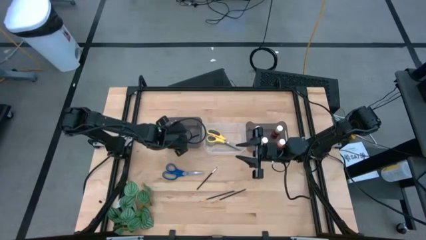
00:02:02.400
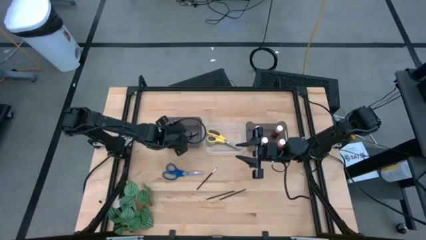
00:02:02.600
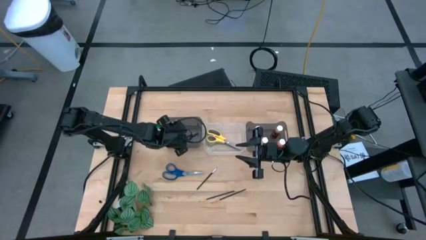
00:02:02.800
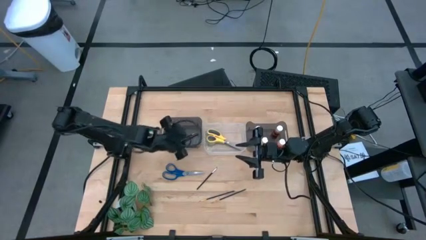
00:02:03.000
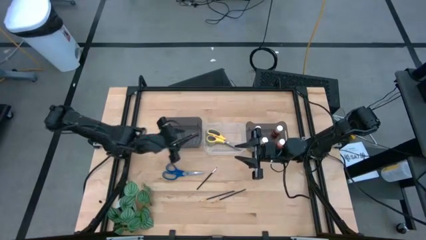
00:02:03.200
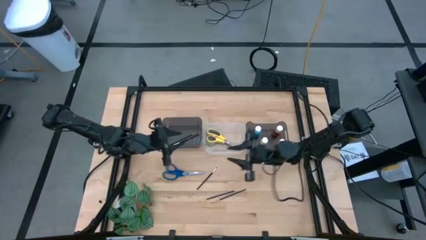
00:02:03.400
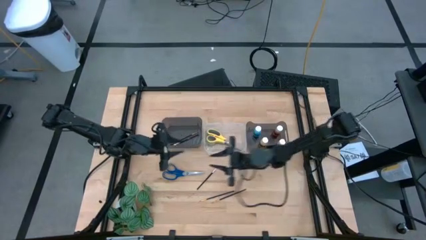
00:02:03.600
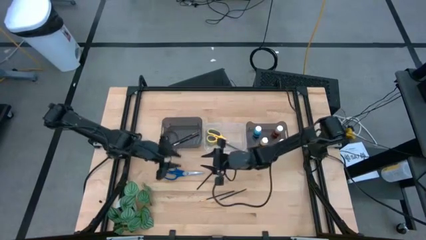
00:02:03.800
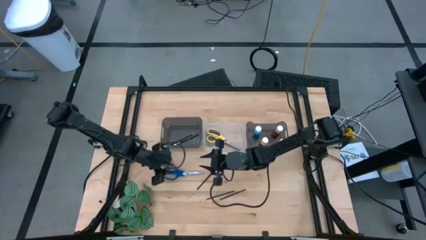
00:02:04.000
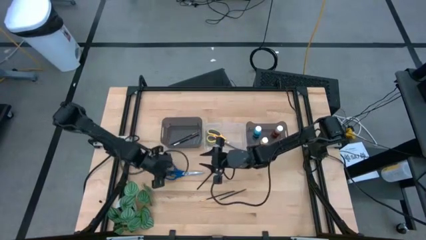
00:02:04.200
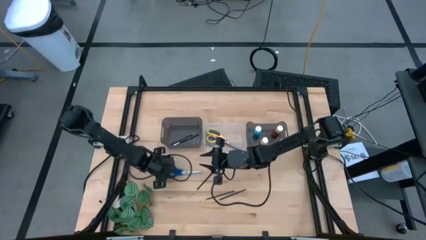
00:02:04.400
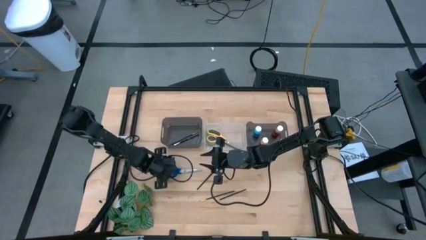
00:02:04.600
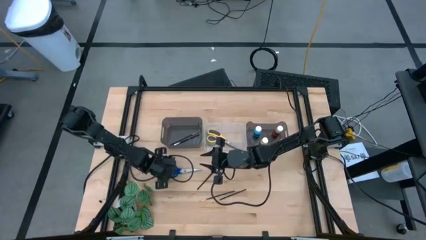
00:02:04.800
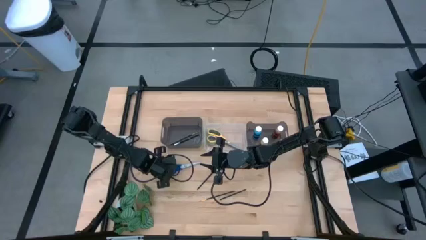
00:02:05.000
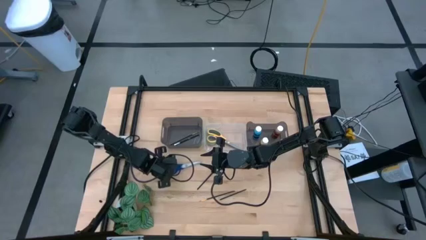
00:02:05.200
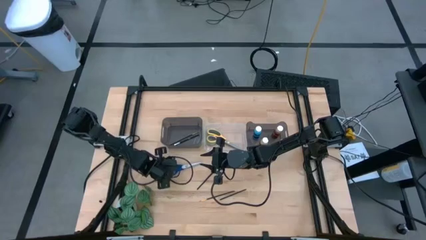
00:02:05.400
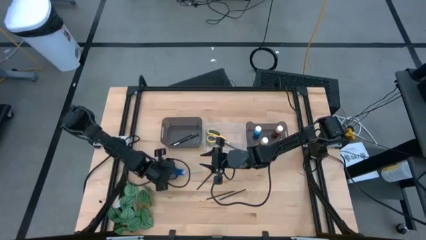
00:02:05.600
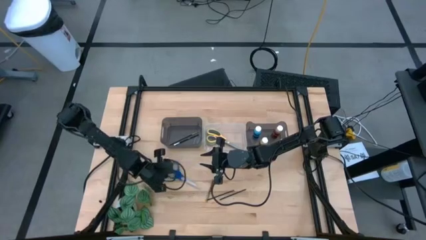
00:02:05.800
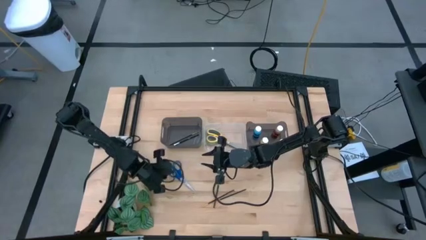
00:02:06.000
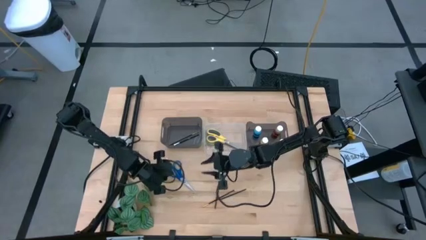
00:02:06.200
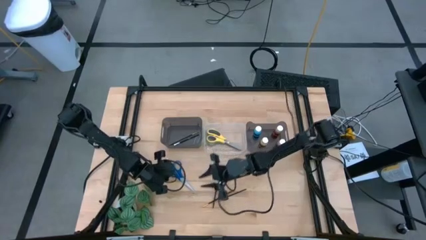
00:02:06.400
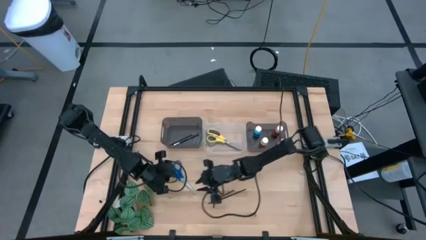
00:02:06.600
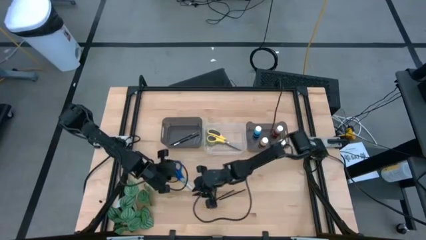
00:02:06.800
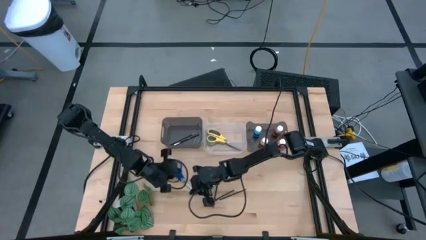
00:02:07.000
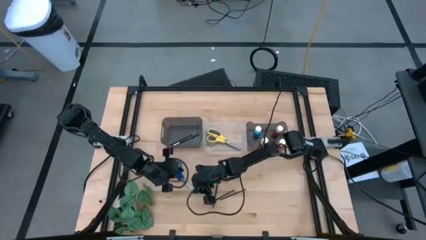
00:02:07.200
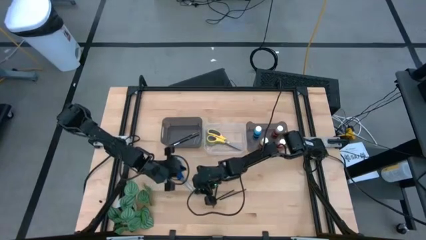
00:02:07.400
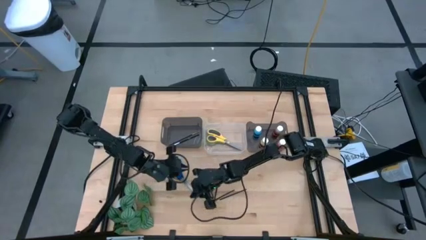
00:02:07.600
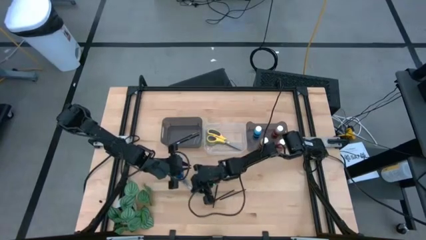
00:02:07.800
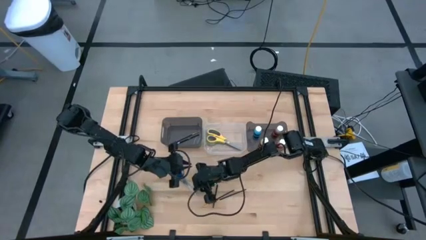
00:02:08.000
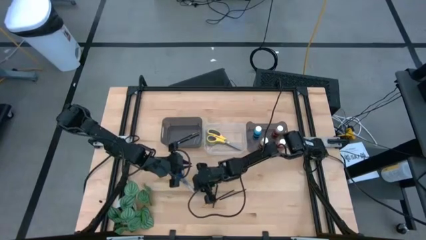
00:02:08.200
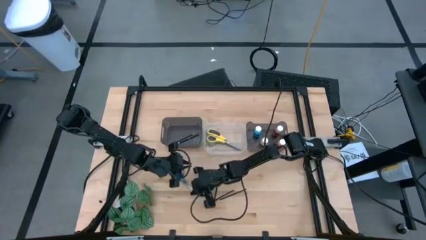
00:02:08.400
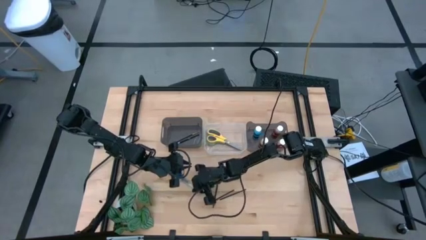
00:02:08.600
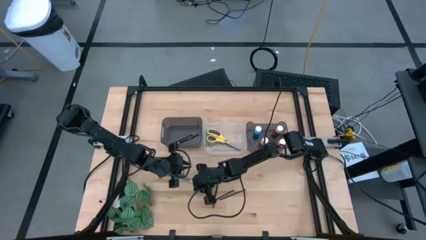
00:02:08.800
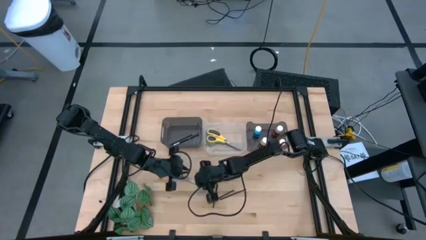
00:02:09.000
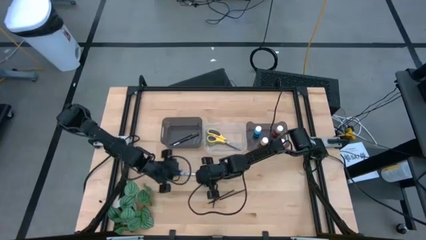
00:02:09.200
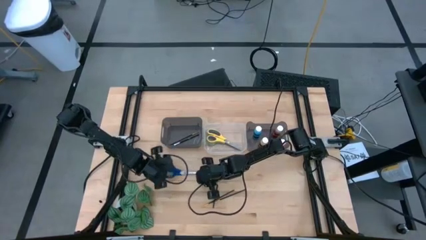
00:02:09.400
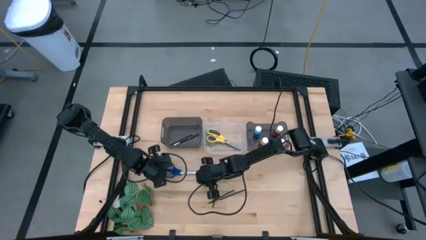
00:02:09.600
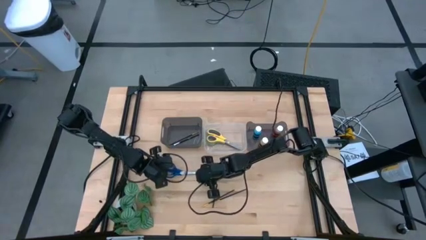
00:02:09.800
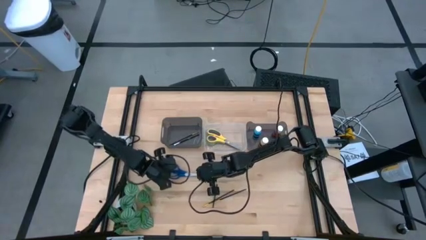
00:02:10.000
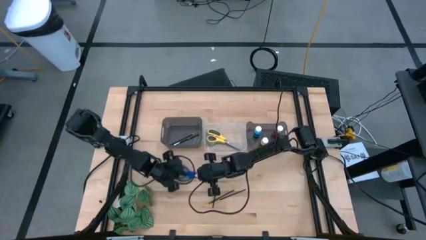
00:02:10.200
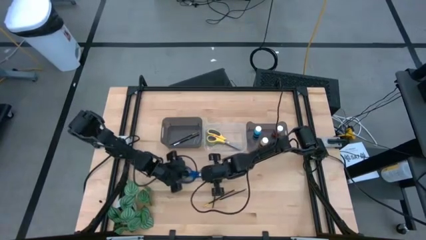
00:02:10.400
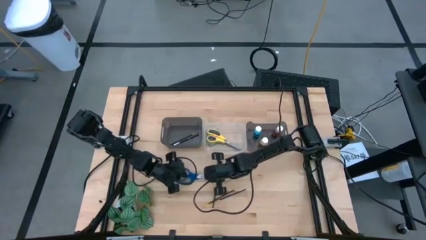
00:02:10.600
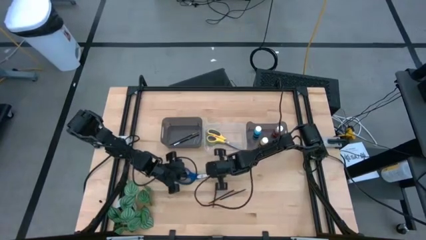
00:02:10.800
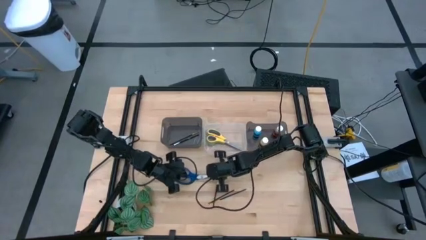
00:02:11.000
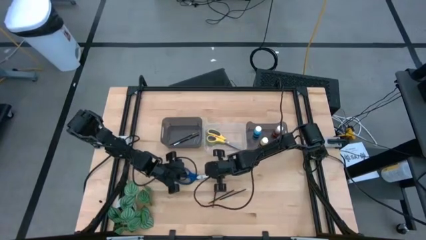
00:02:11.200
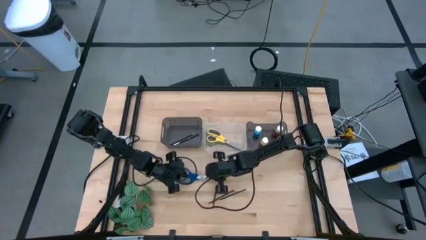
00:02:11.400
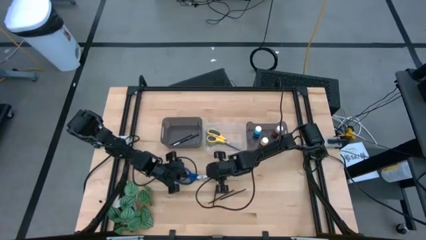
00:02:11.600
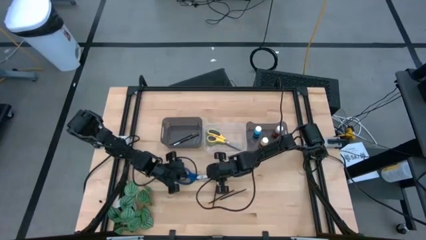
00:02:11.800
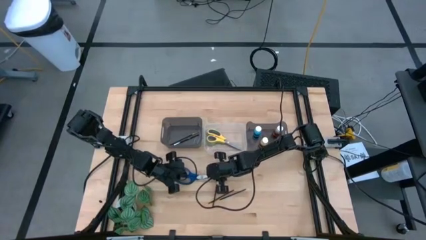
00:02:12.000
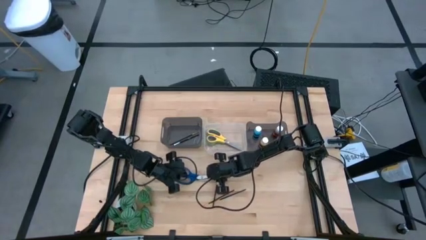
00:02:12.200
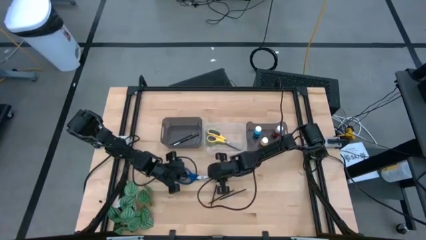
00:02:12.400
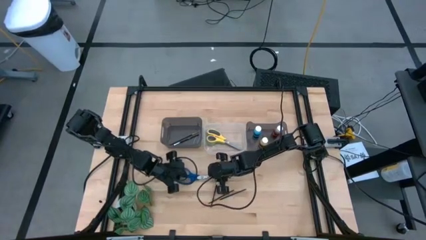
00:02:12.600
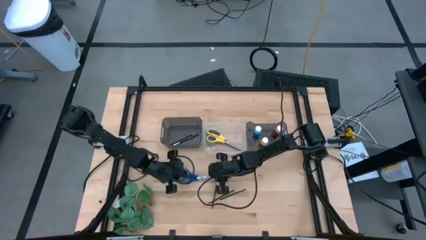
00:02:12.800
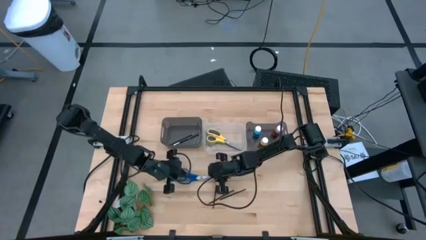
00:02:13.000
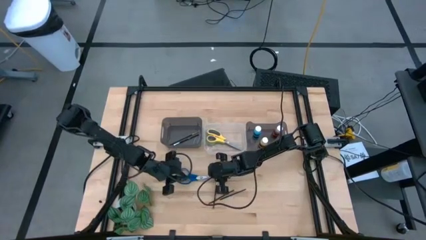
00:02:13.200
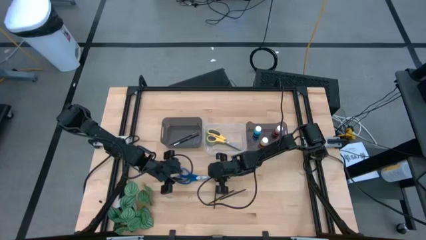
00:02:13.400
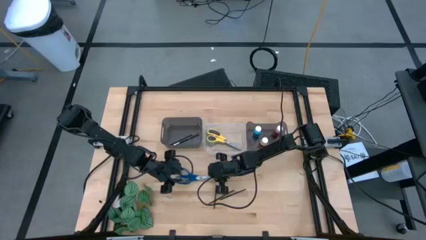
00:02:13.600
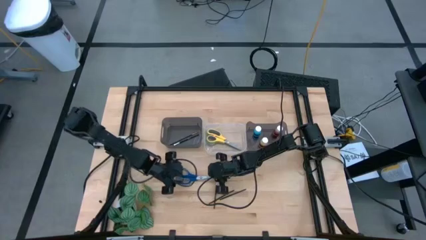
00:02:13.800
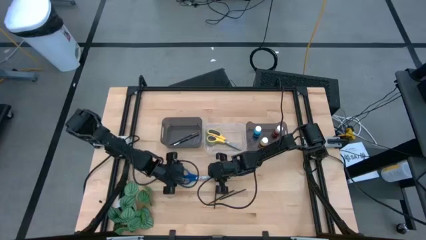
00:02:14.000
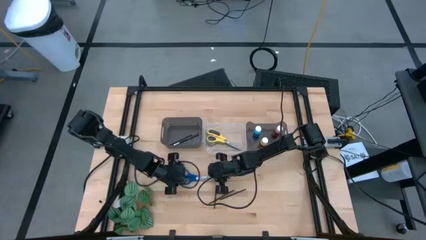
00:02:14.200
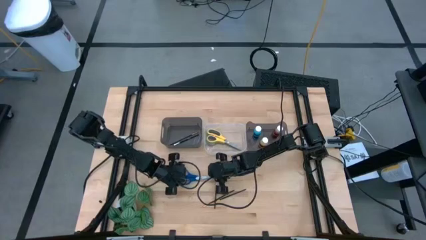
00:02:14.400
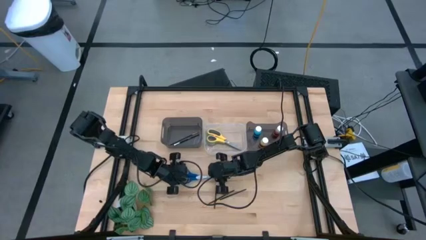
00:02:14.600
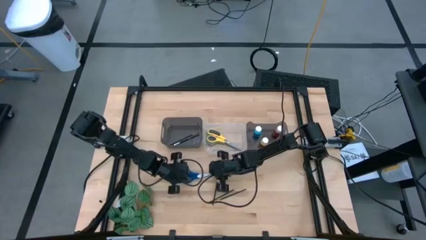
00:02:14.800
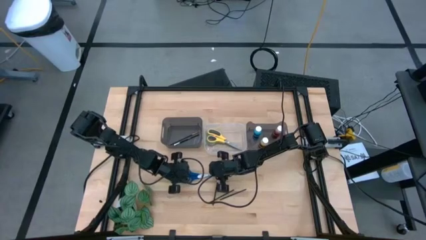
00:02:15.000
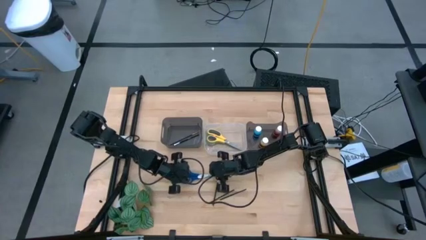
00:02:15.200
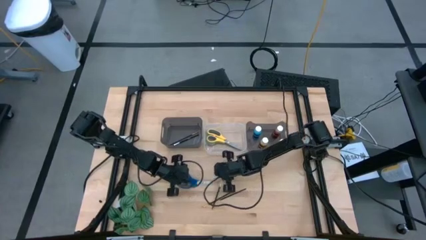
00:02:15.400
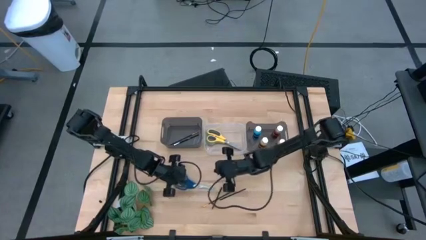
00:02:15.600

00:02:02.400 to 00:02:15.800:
Task: Pick & Place Paint Supplies
Put the blue scissors into the transparent bin

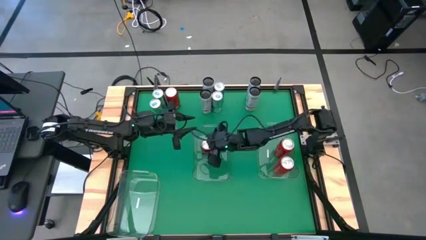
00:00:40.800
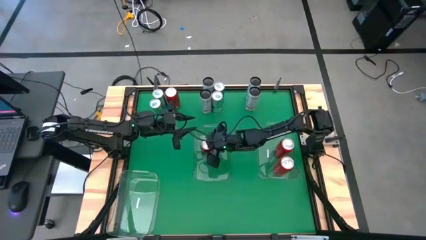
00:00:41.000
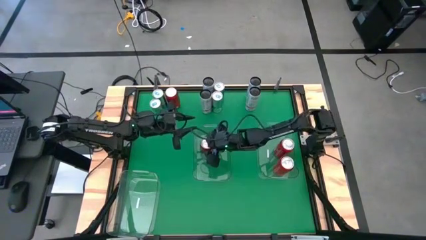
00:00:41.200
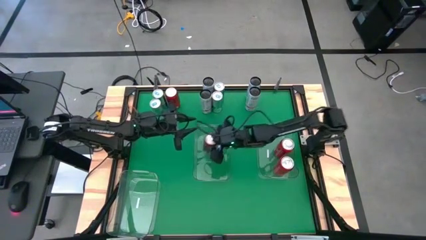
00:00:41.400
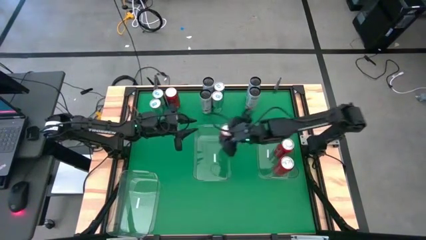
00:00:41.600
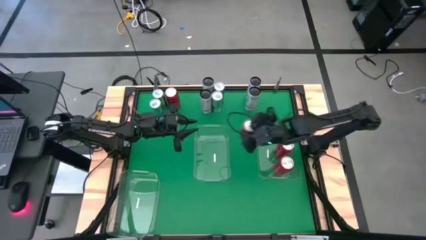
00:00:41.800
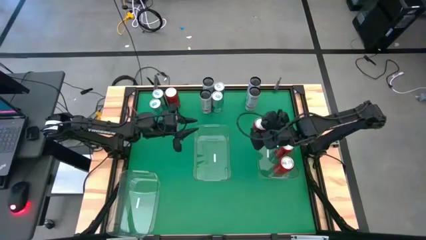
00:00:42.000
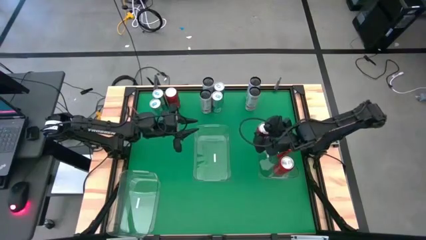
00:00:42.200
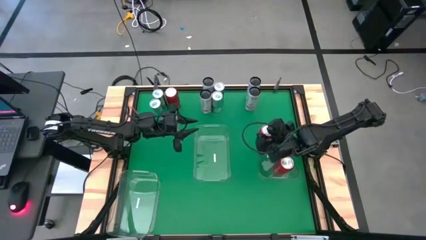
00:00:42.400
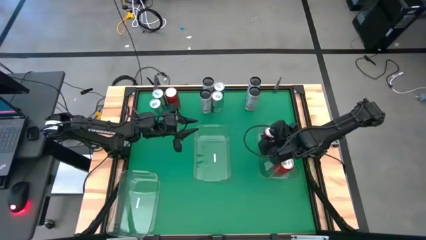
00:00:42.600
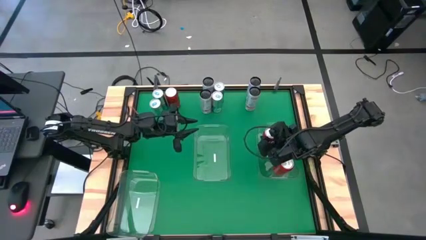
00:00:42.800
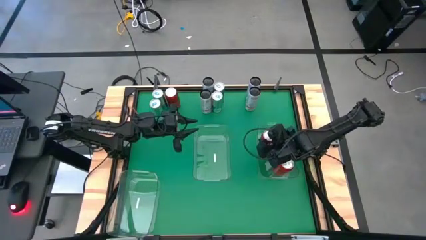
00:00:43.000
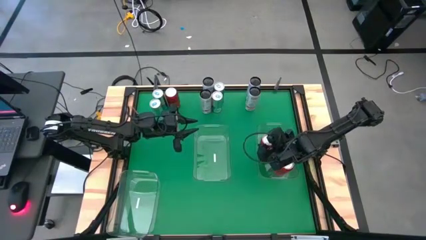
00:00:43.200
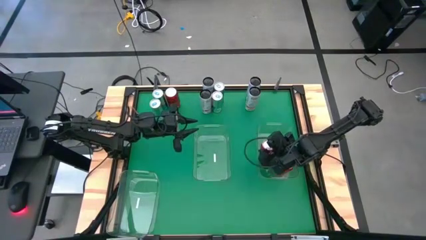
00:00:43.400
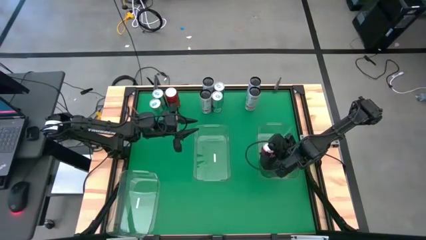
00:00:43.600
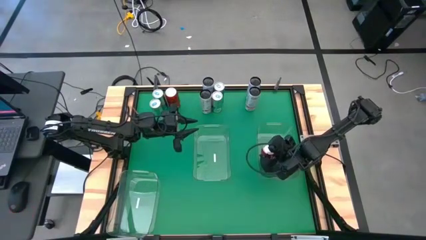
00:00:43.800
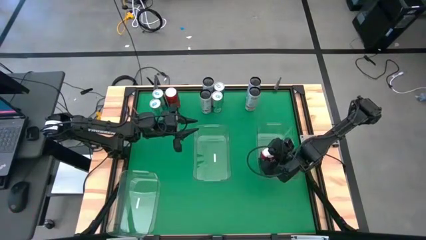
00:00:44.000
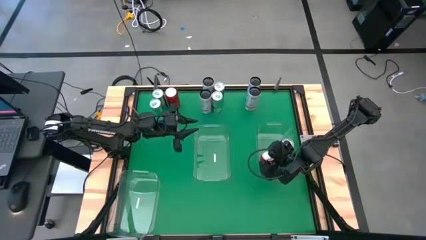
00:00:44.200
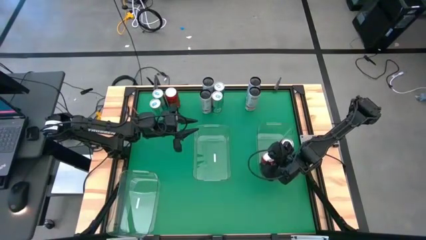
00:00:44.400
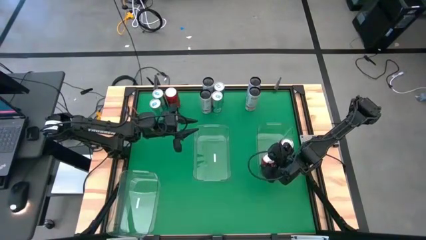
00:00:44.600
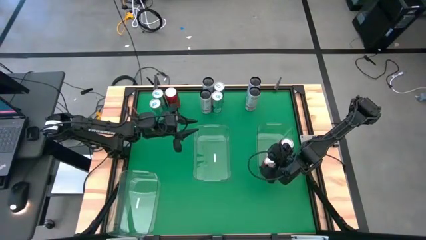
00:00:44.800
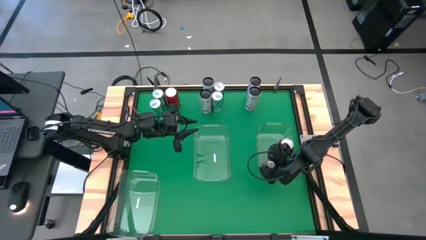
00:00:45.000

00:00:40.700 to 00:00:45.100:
Task: Sort soda cans
Put the bottom red-black soda can into the top right transparent bin
